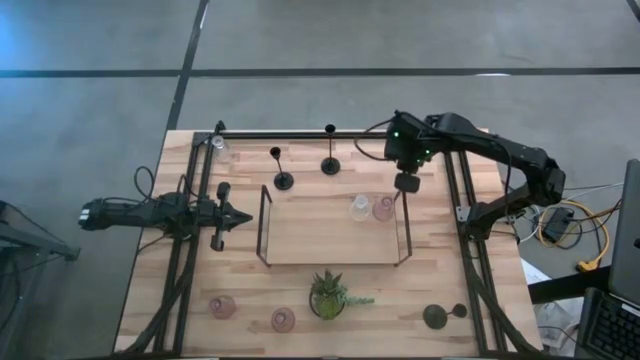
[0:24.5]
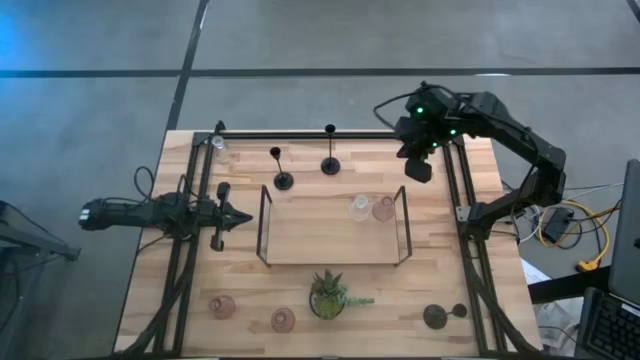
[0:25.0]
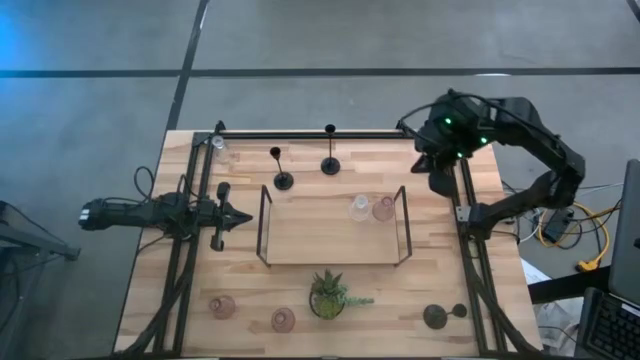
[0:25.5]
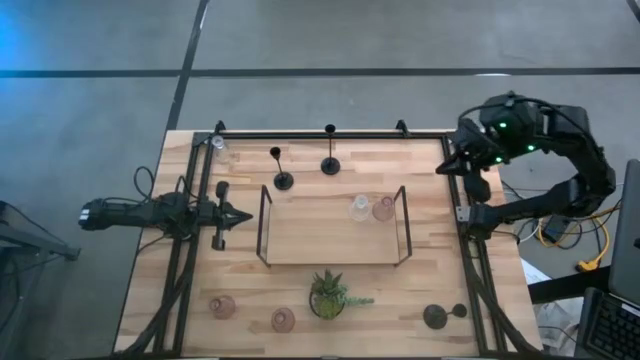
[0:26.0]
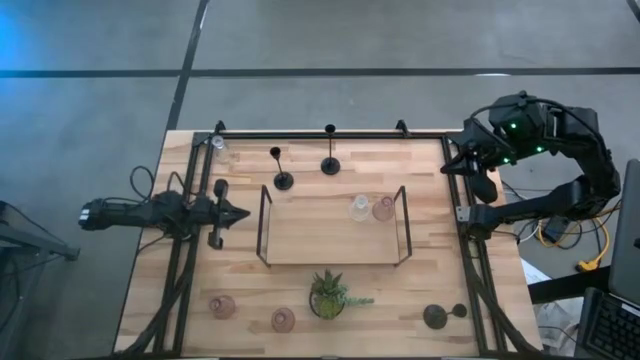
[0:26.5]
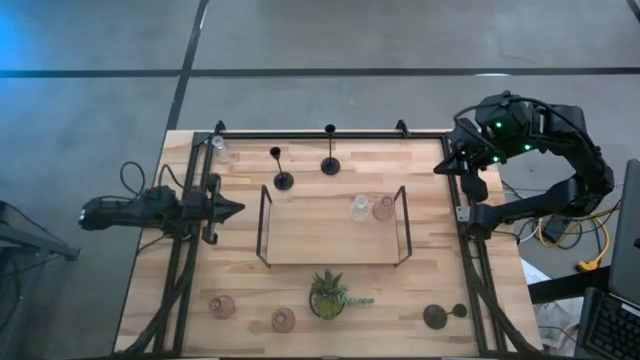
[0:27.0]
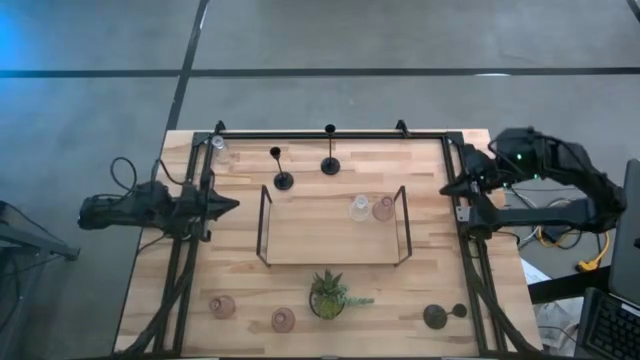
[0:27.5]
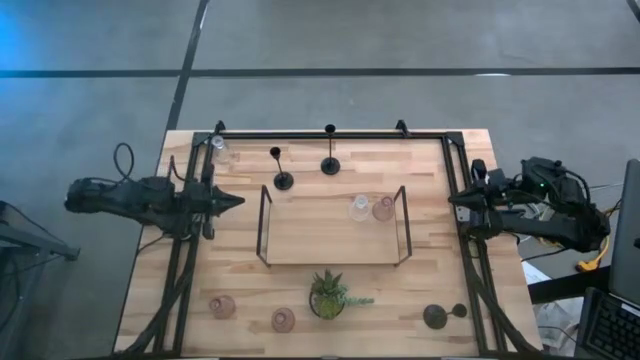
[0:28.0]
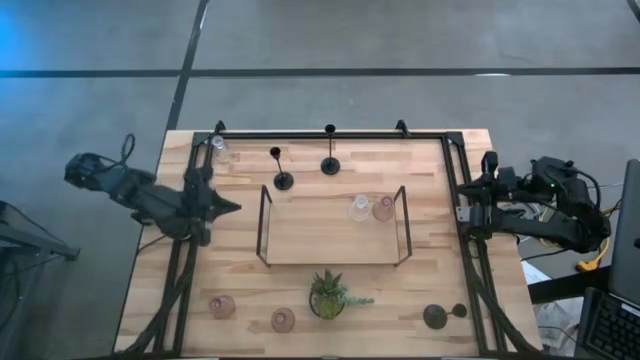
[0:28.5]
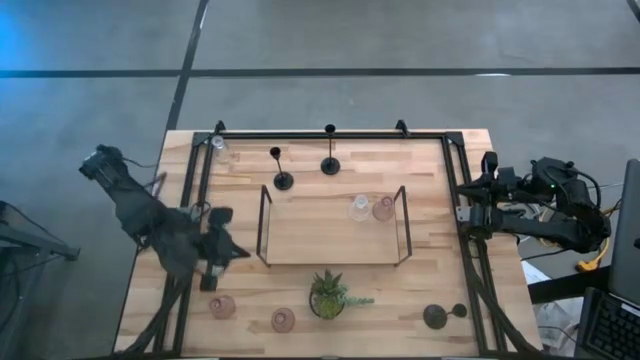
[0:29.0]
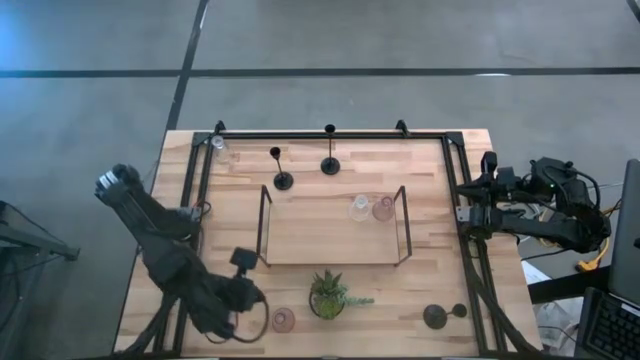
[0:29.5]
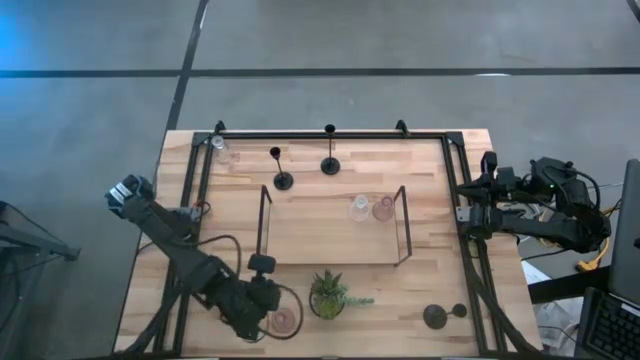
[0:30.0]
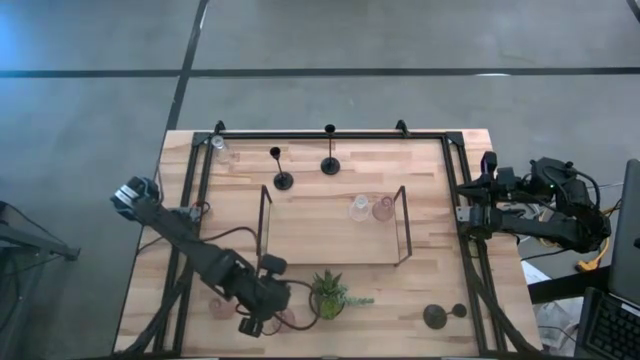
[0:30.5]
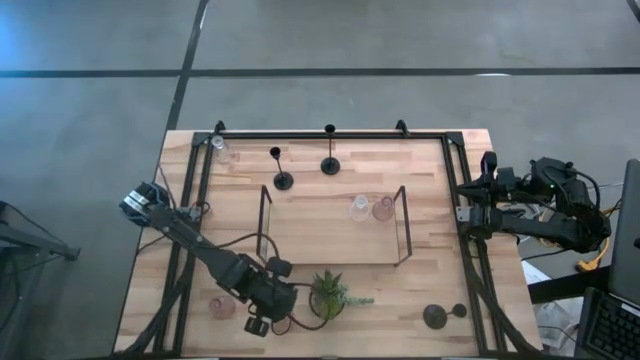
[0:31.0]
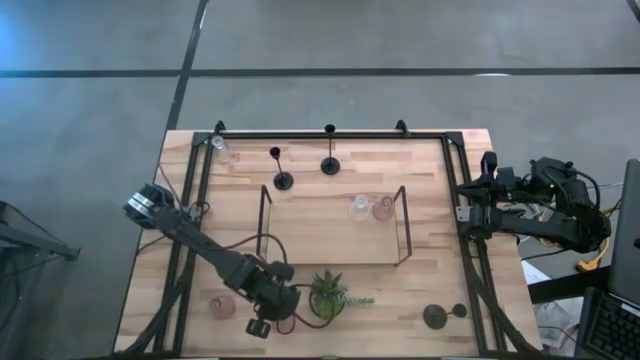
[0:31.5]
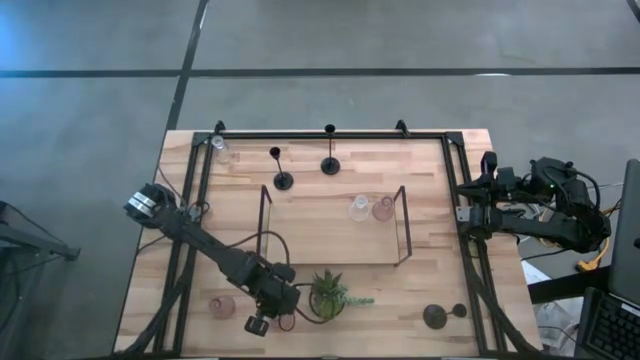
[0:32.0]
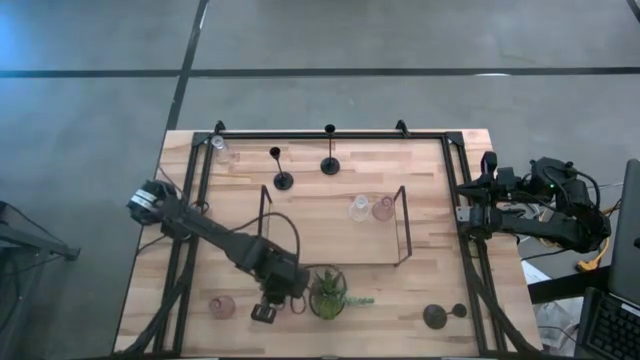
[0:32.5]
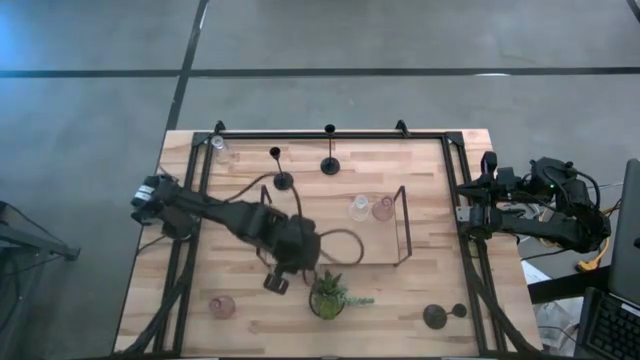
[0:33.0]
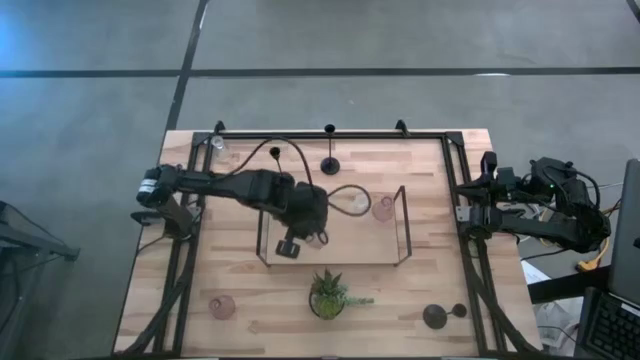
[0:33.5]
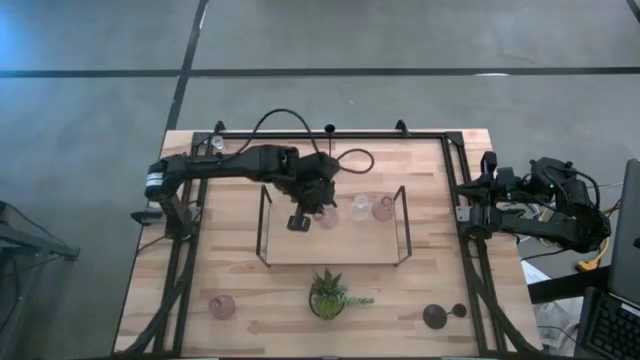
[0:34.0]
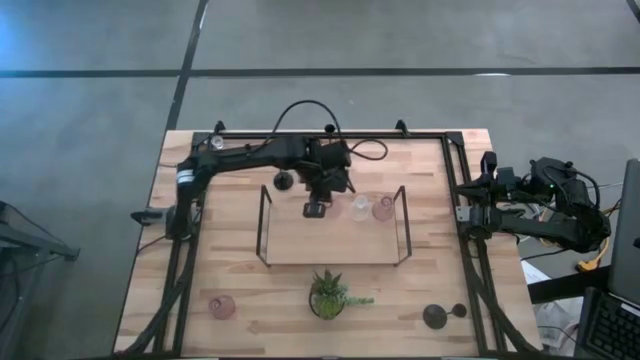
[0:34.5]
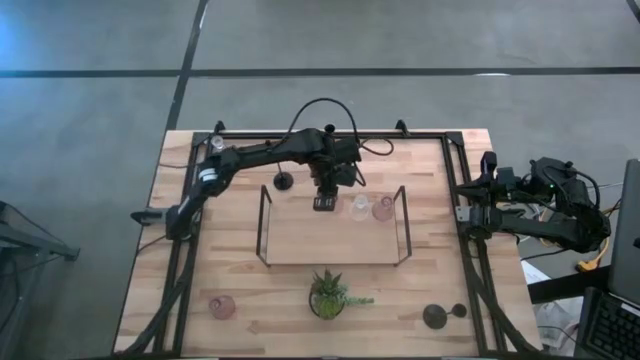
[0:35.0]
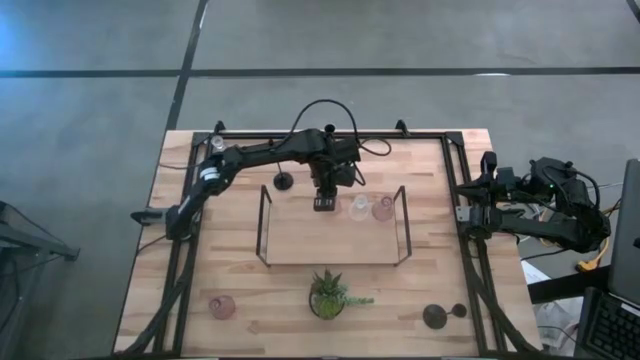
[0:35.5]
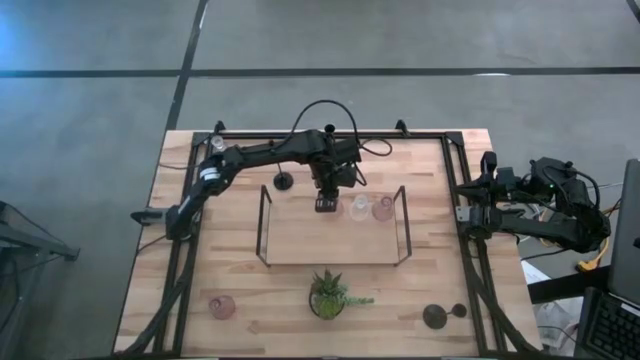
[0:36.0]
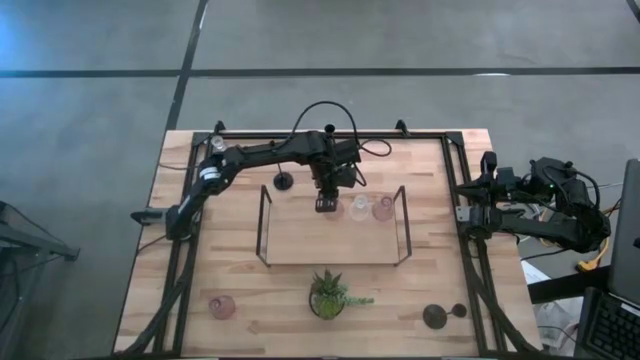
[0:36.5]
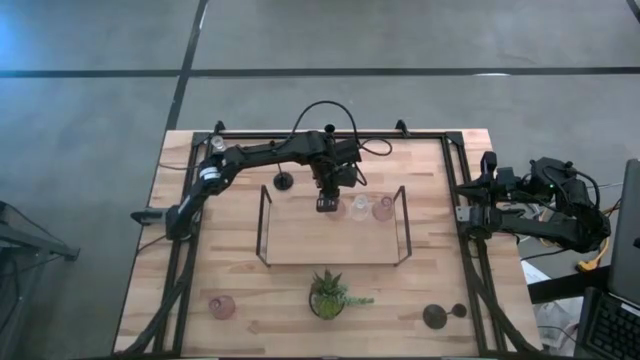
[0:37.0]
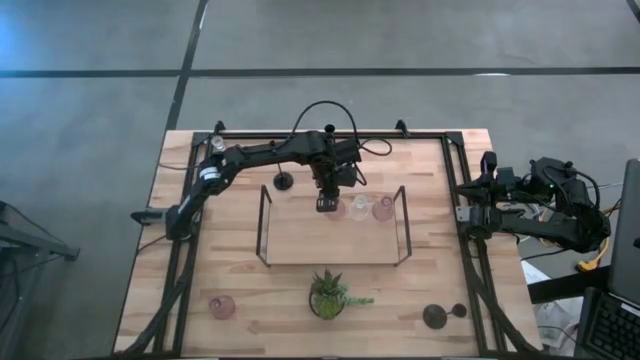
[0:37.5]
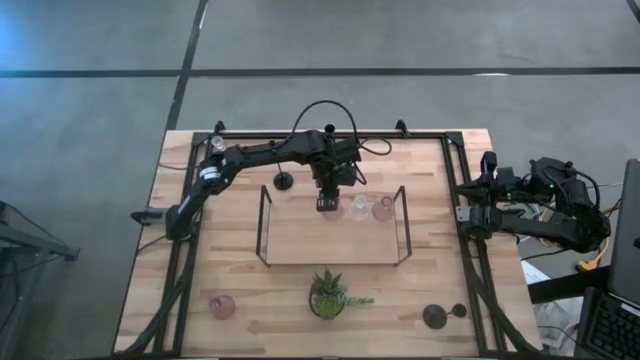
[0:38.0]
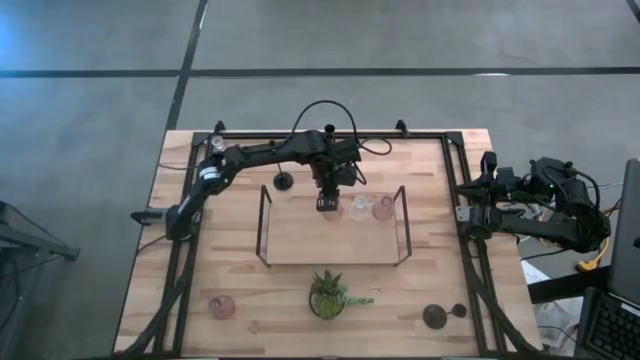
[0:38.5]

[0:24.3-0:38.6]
Task: Pick & Place candle stick holders
Put the right pink candle holder on the shelf

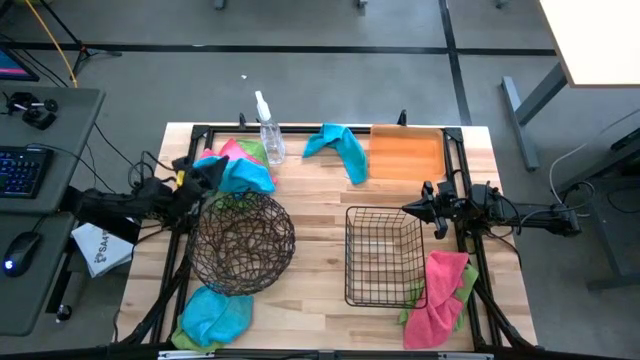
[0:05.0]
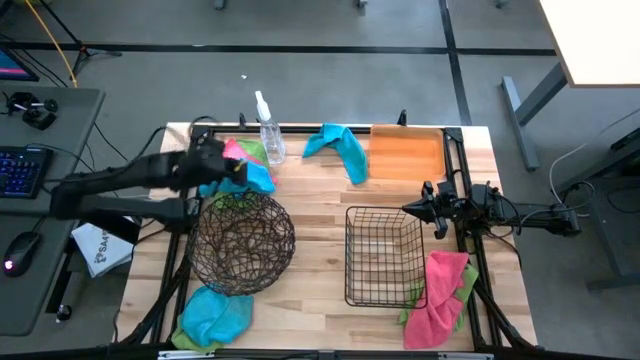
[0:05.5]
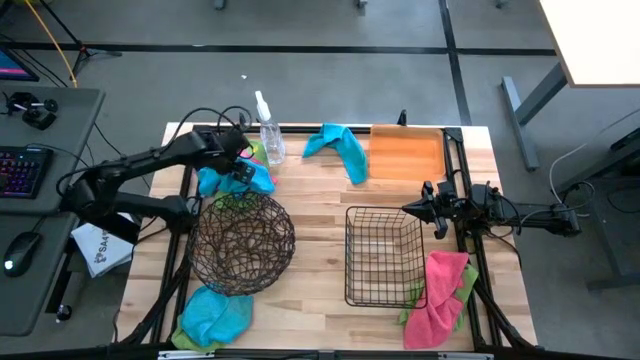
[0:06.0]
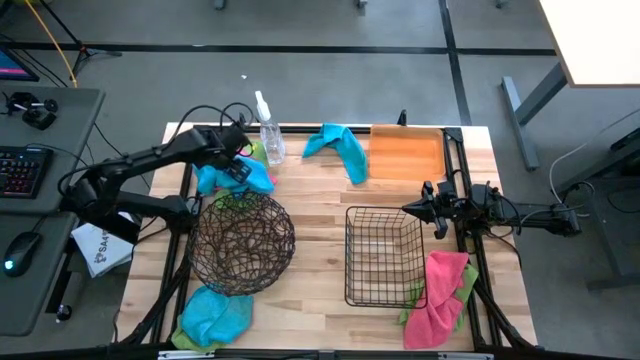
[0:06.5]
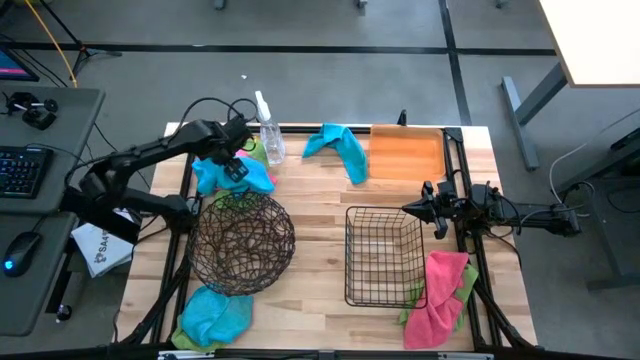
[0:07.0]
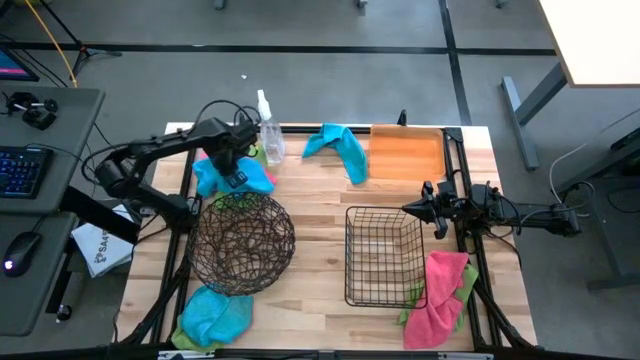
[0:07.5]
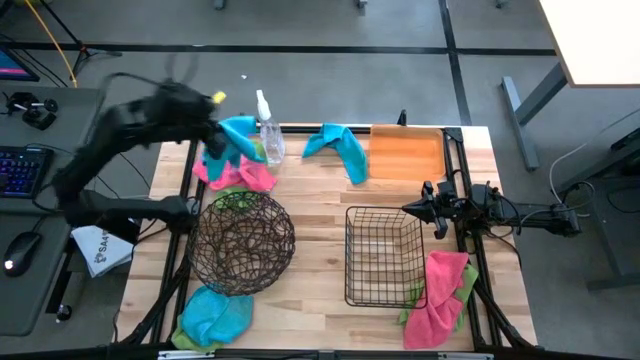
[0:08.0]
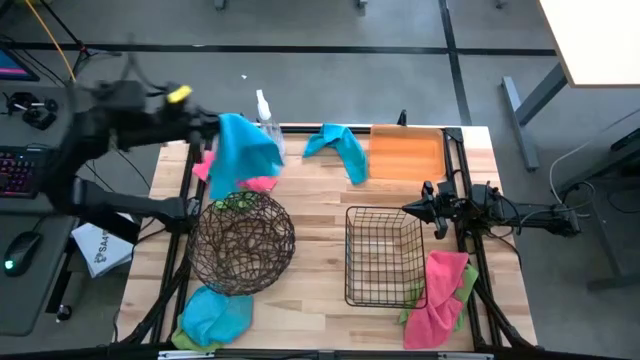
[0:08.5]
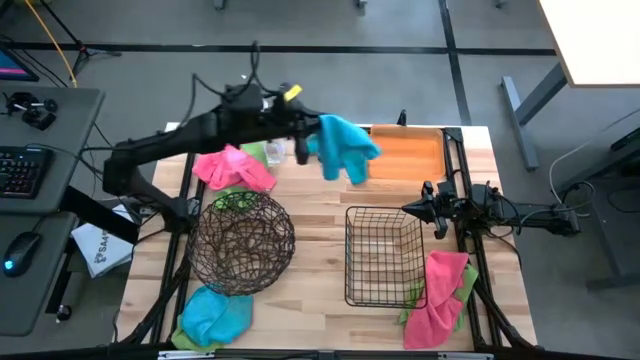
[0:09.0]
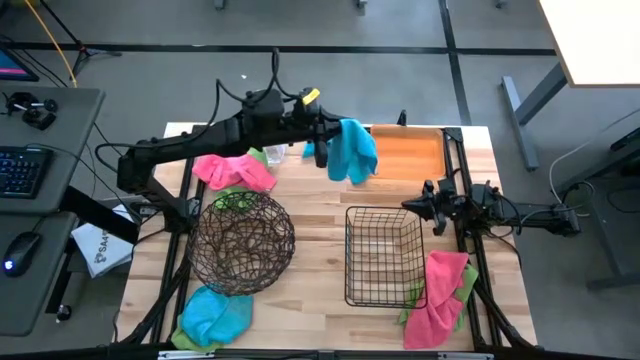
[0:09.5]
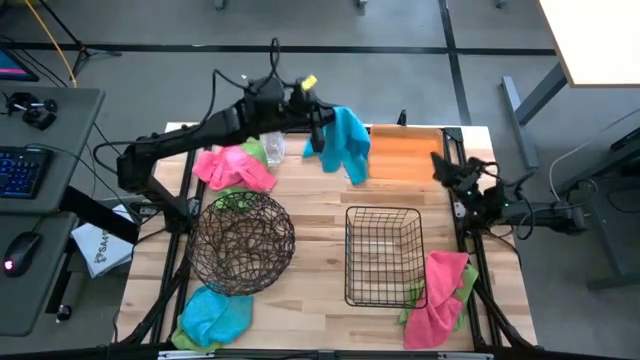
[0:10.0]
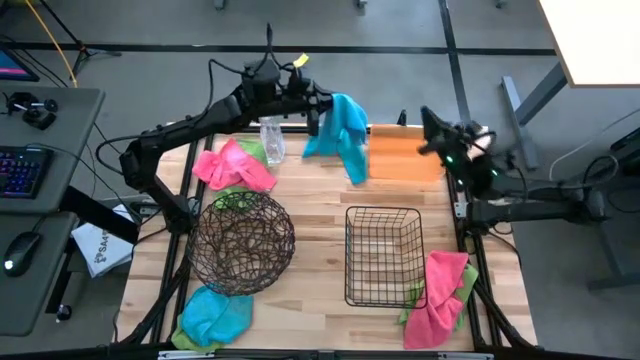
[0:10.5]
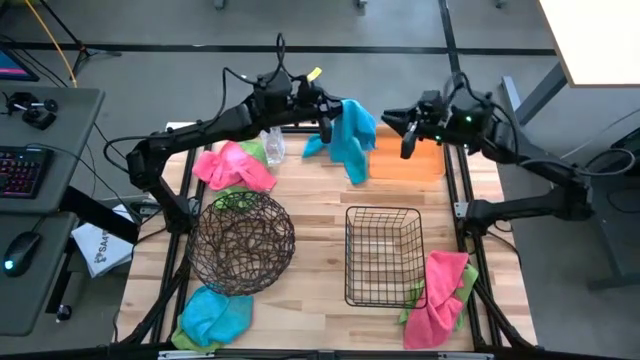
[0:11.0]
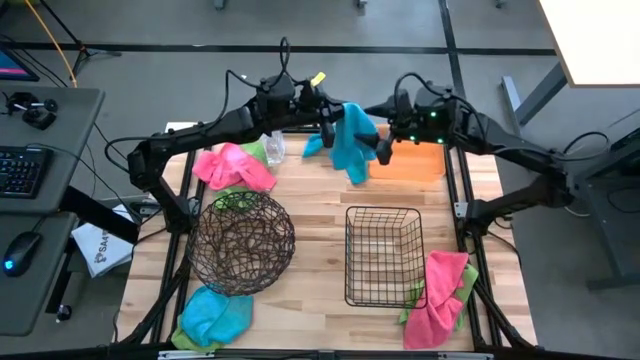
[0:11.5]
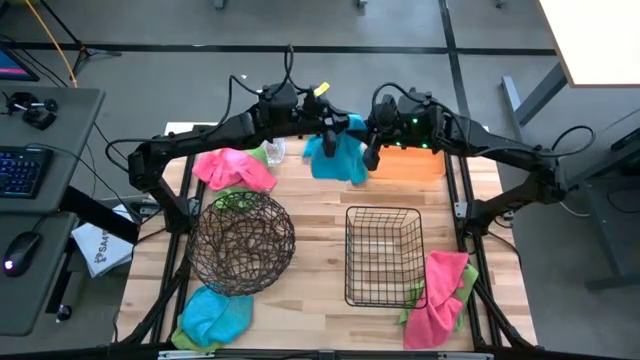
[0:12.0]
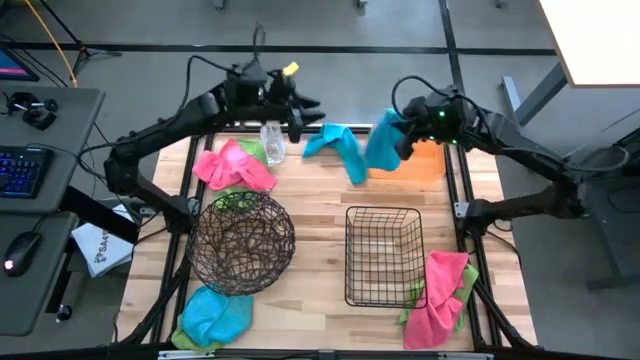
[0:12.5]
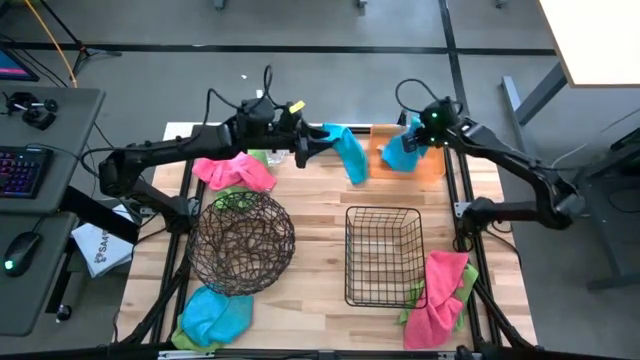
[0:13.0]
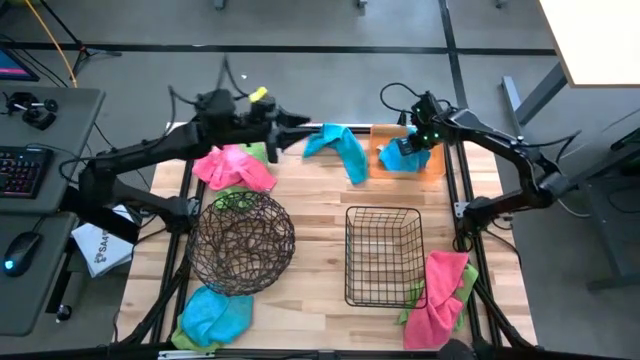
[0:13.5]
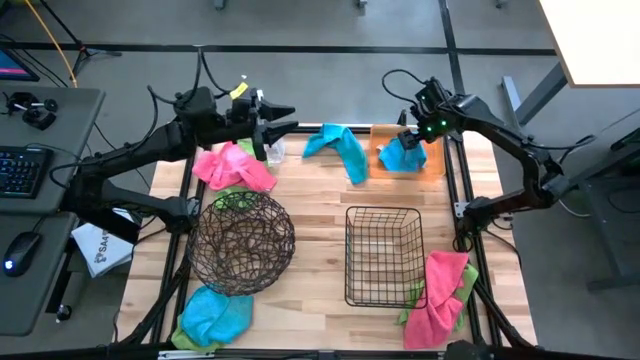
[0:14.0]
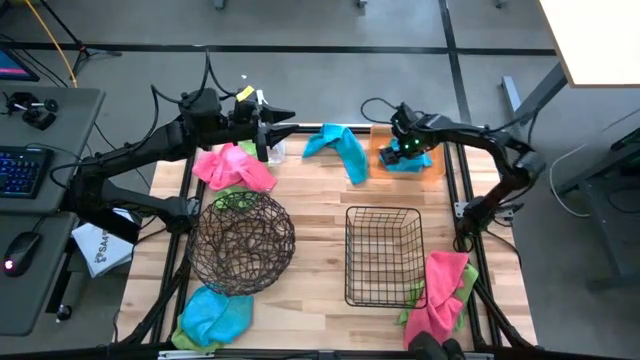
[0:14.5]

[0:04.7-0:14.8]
Task: Sort microfiber towel by color & place in baskets
Put the left blue towel into the orange transparent bin
